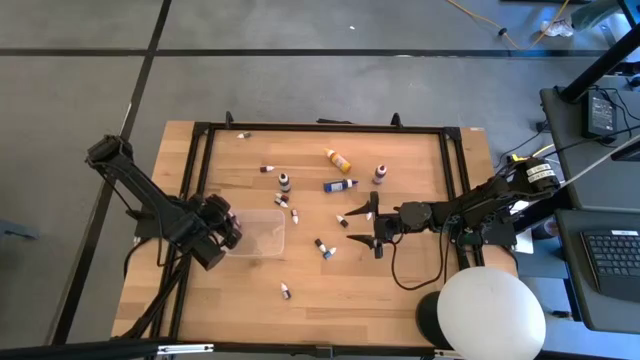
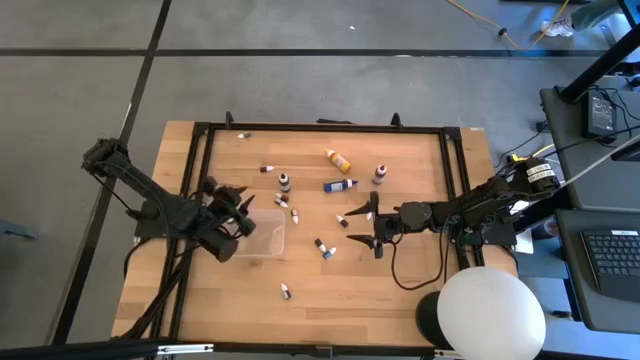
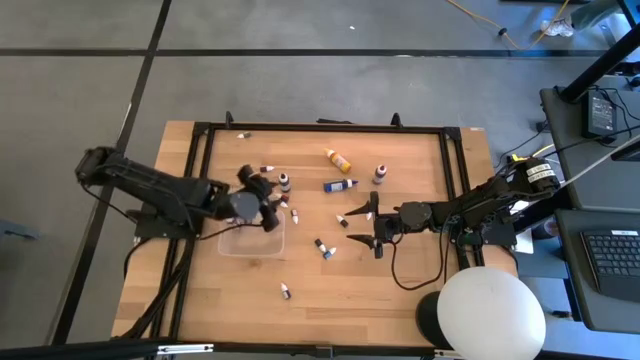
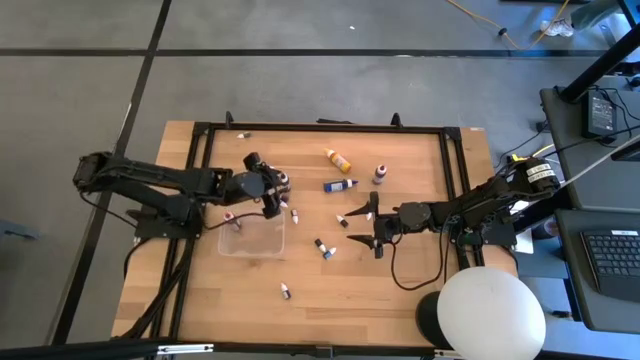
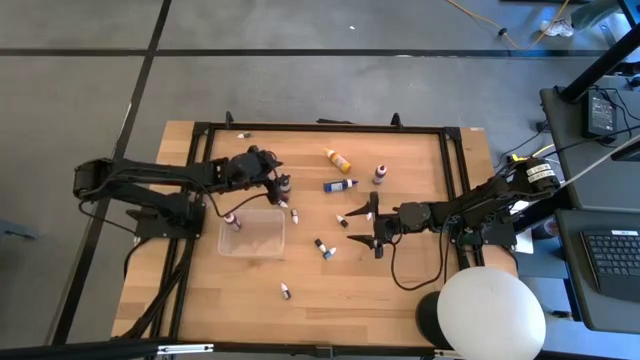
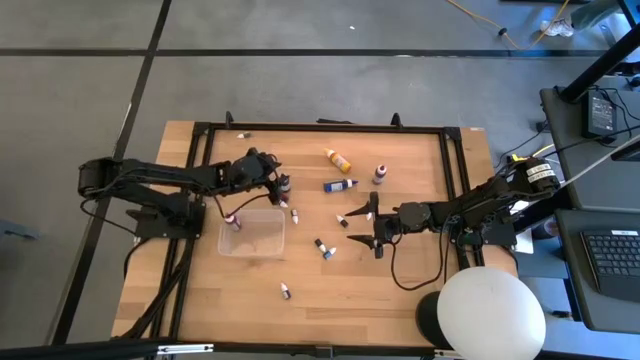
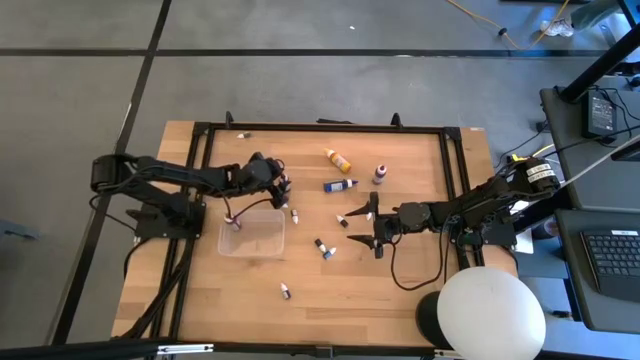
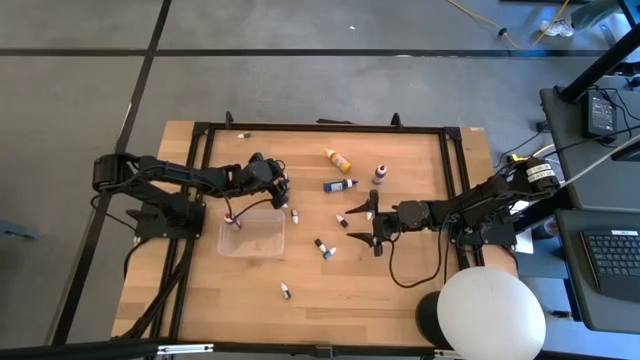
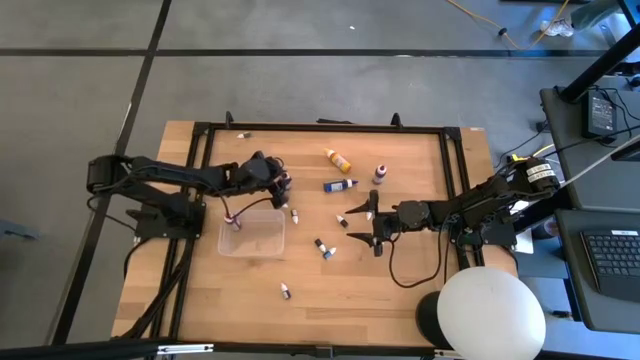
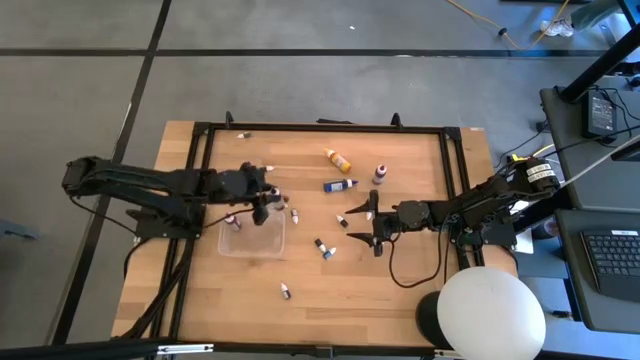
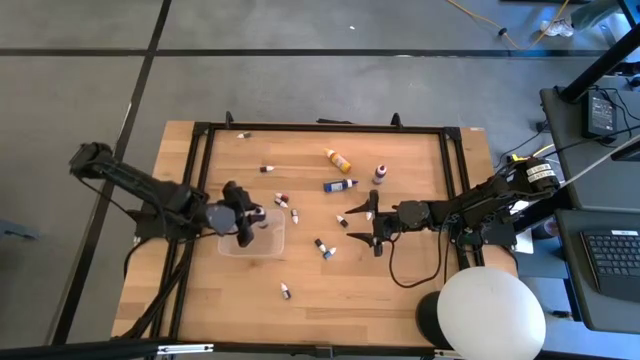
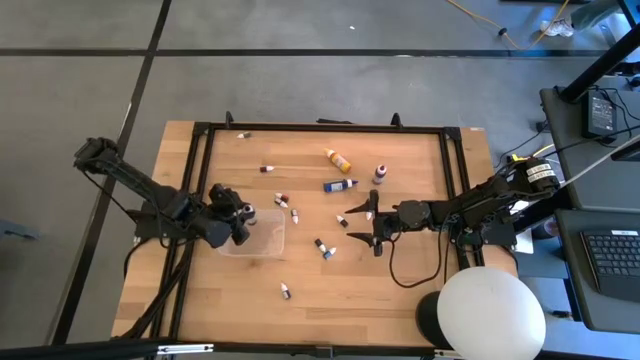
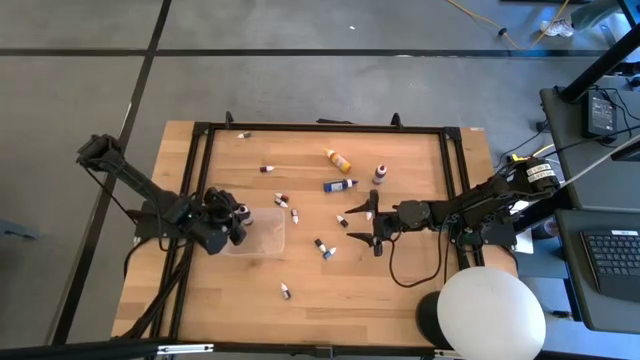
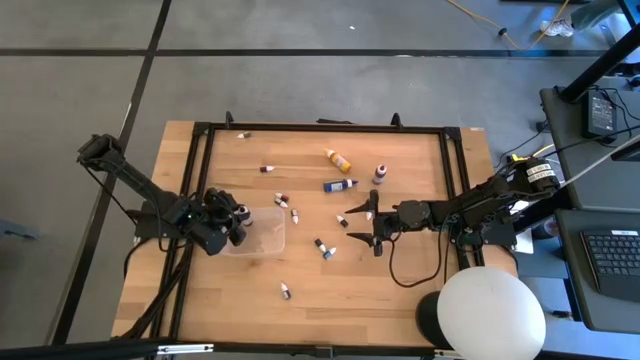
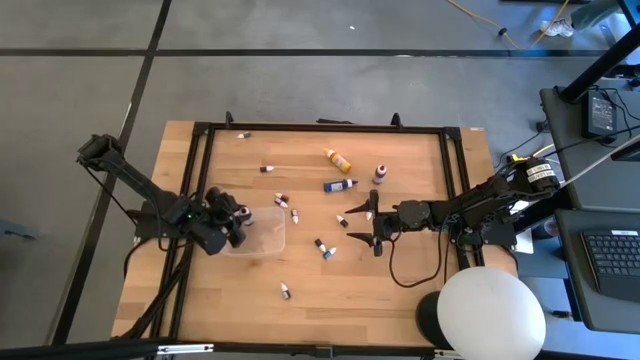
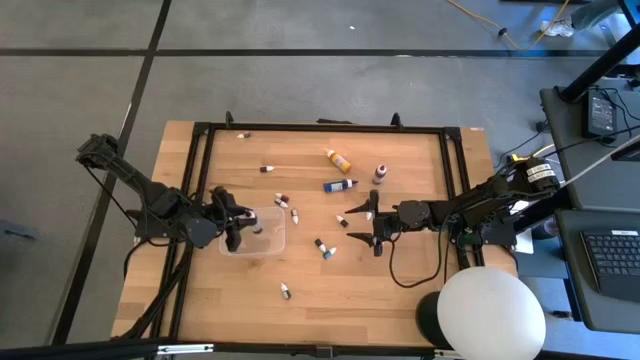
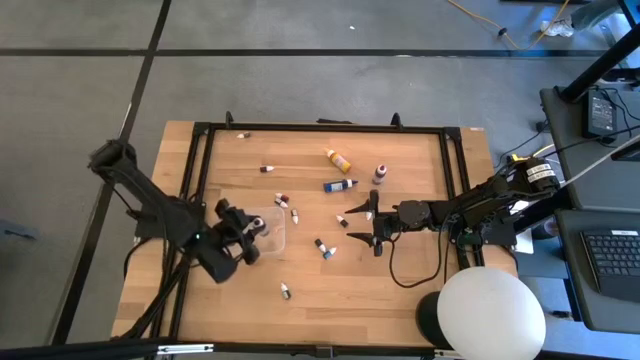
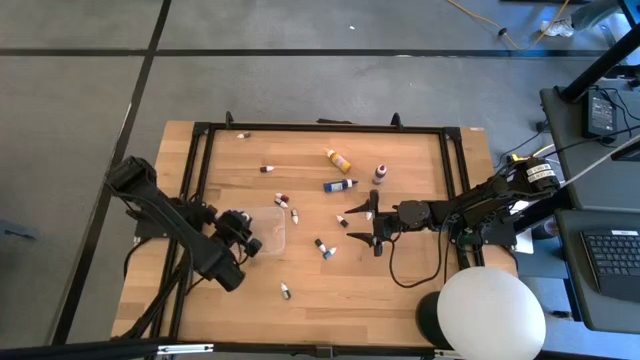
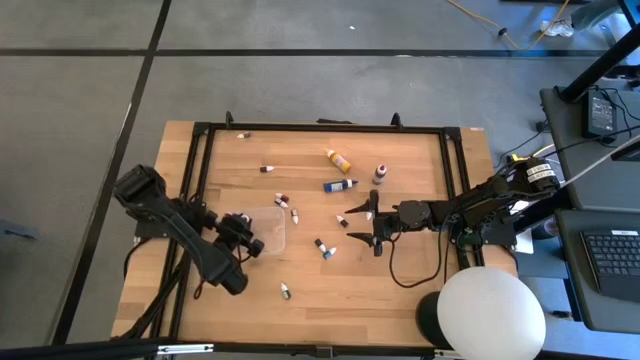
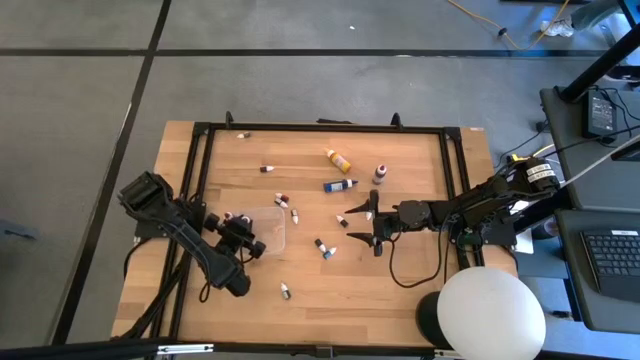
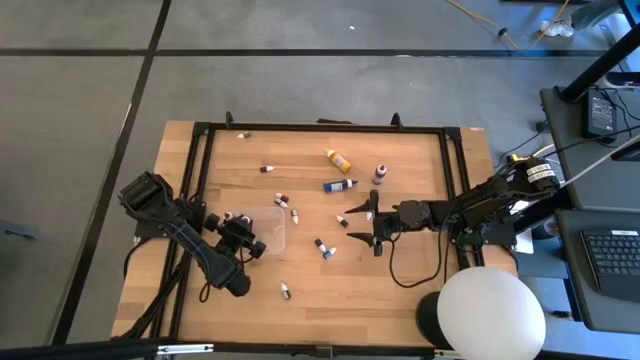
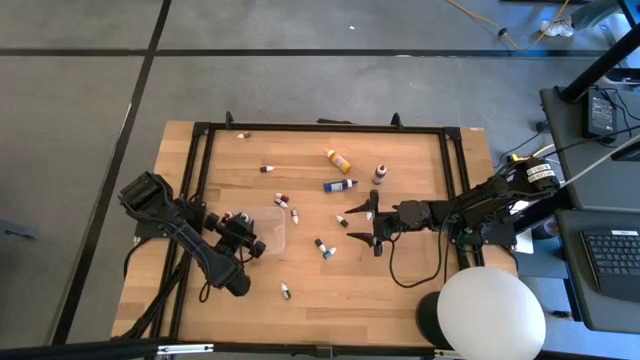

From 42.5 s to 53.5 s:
Task: Pick & Place food coloring
Put the large black food coloring bottle into the transparent bin

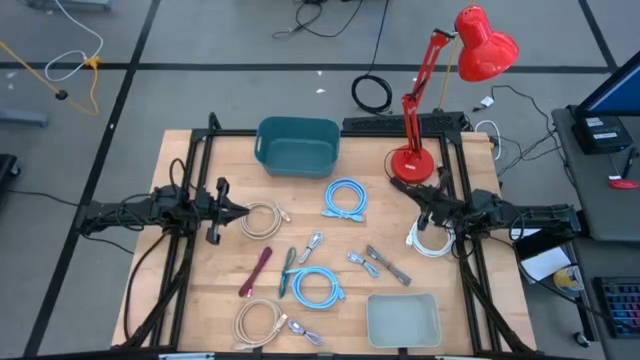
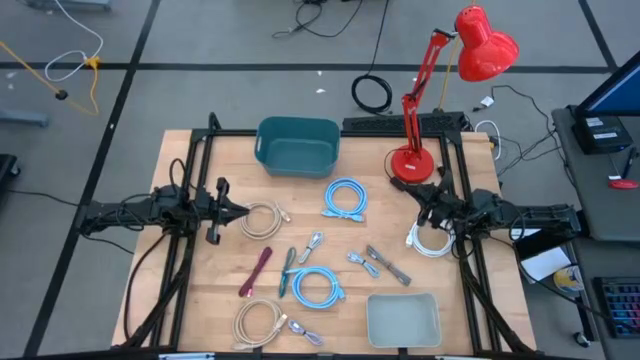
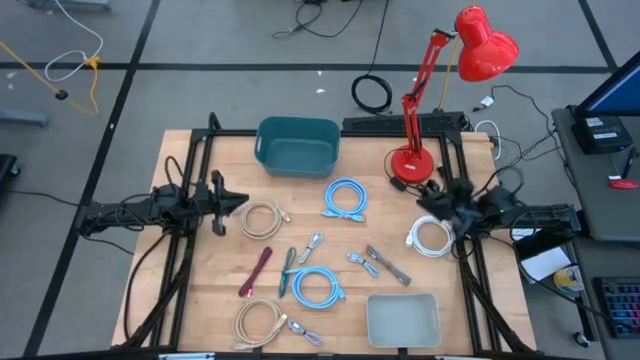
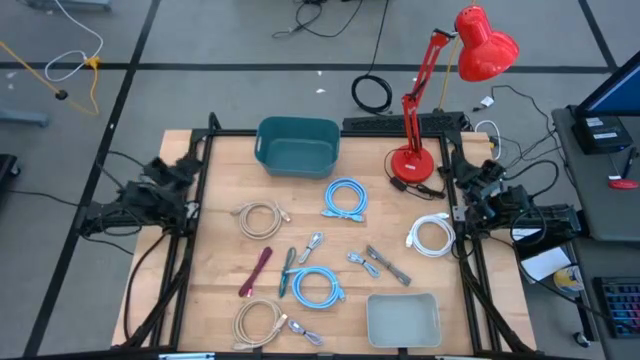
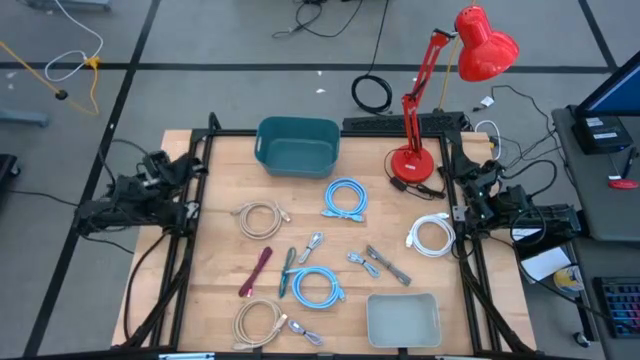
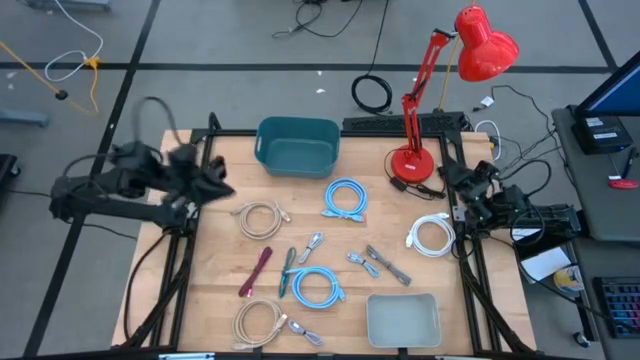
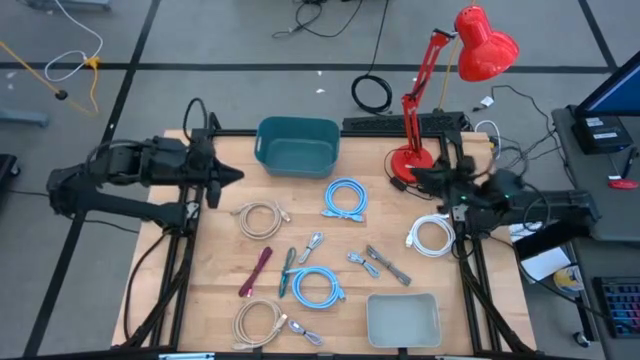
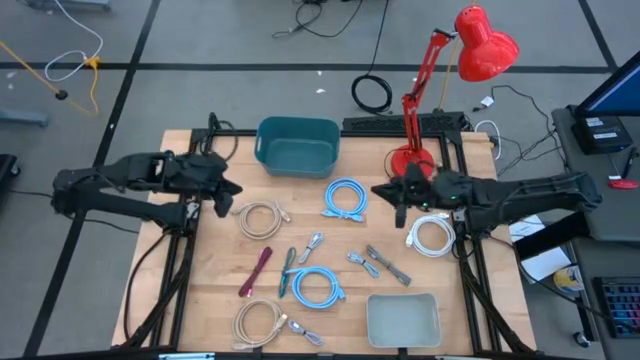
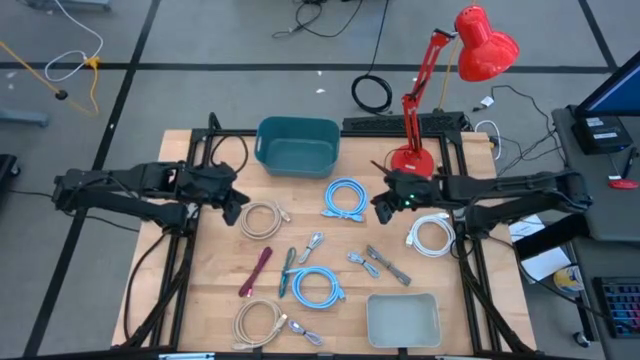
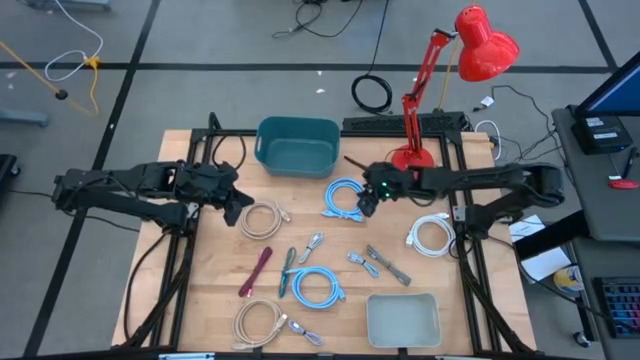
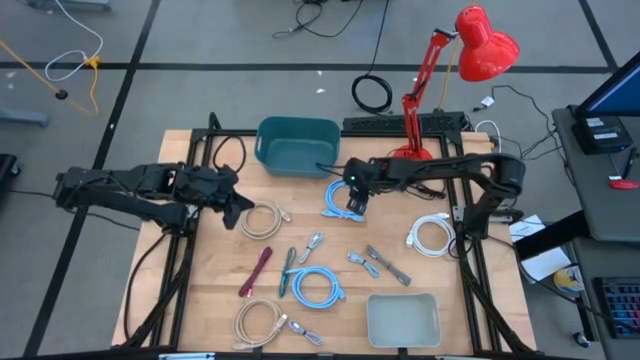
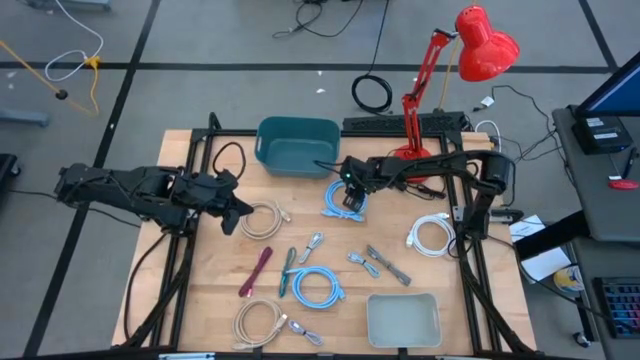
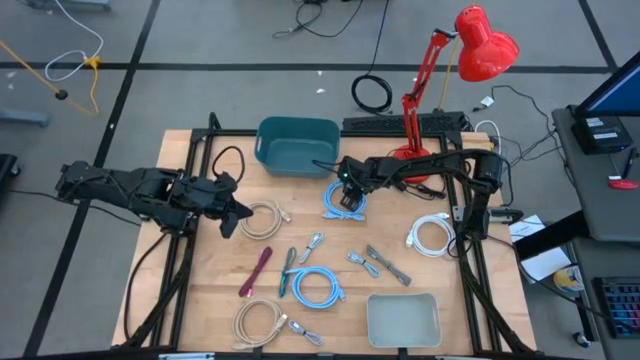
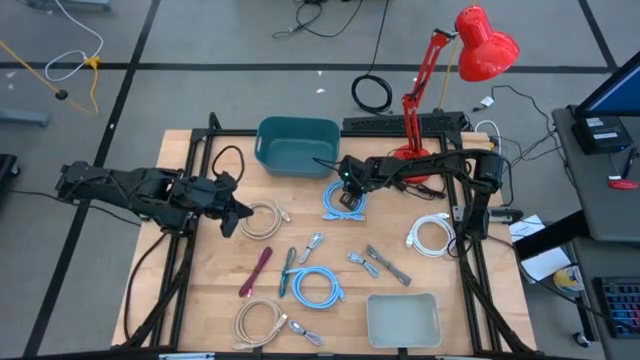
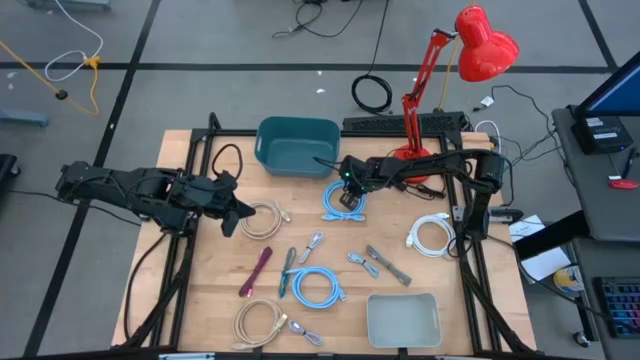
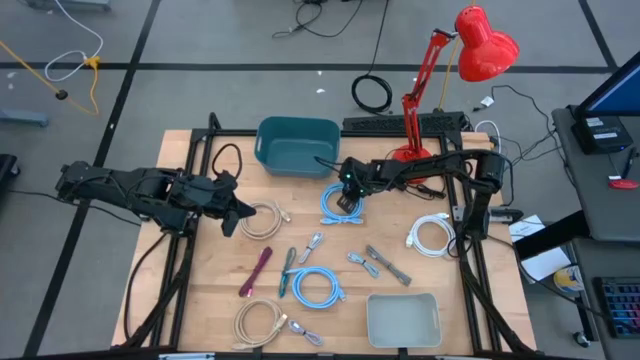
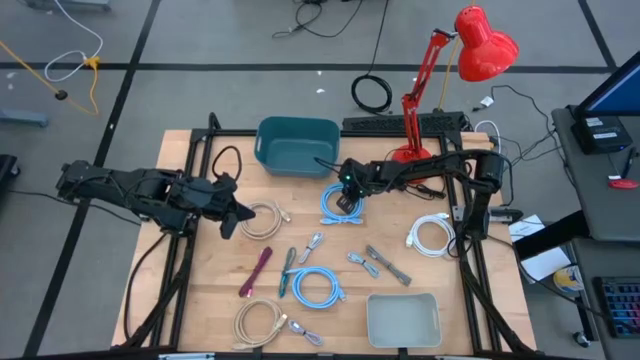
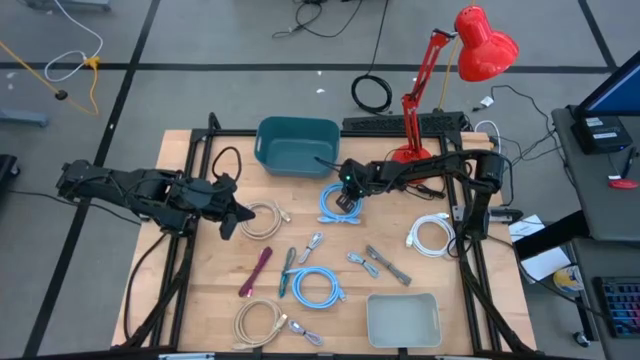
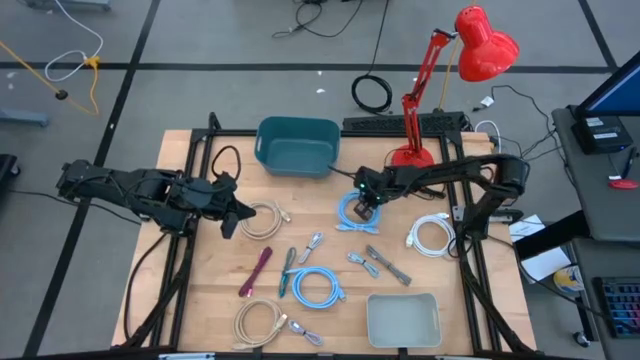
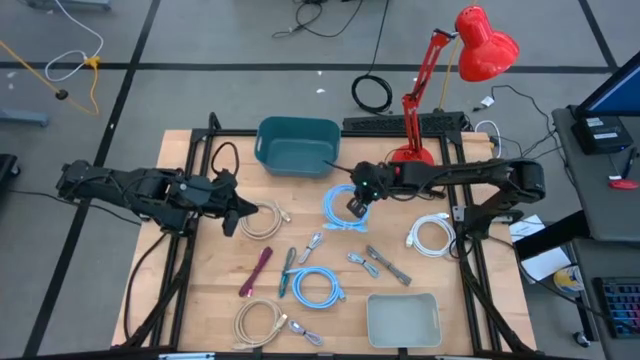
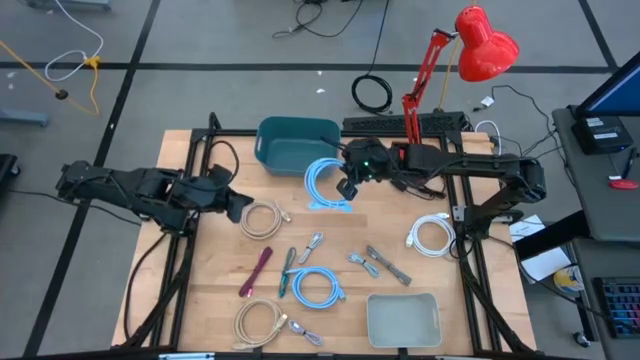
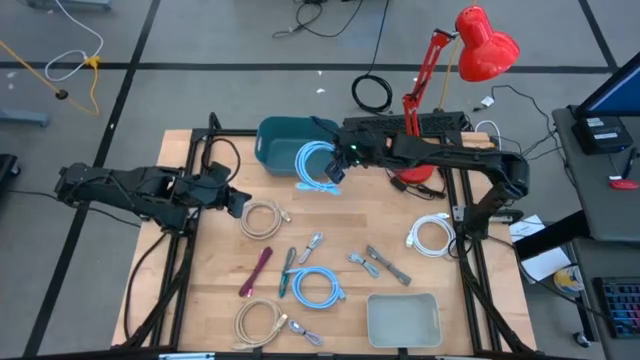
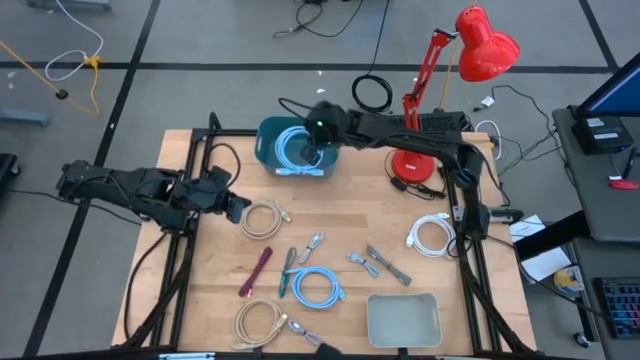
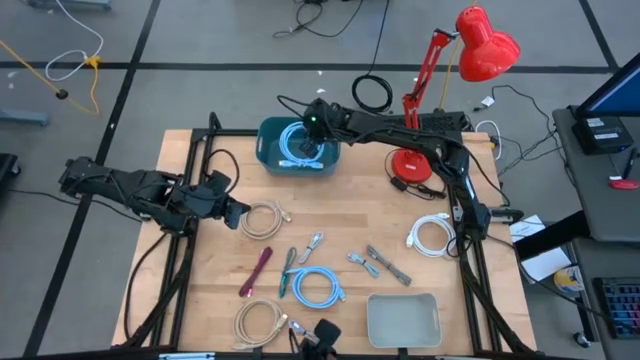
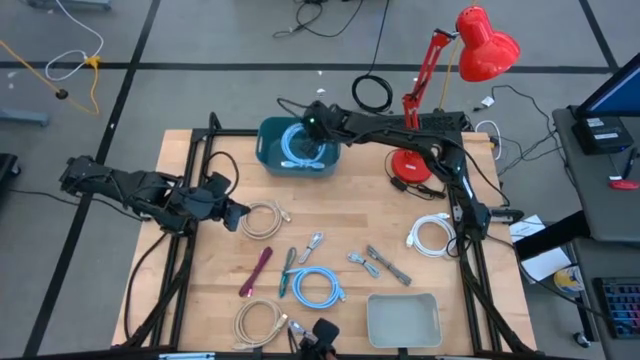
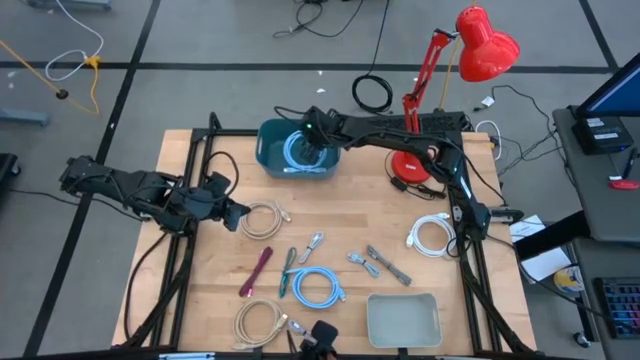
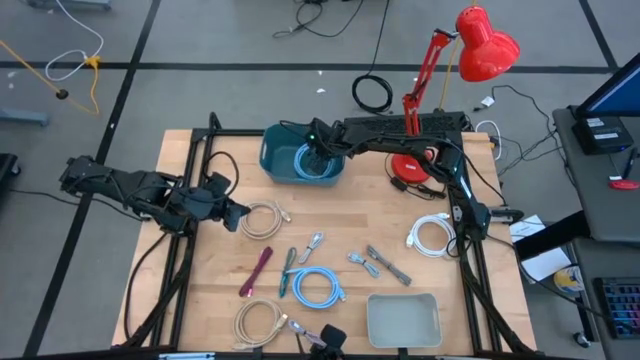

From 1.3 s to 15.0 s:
Task: Sort cables into bins
Put the top blue HDMI cable into the blue bin
